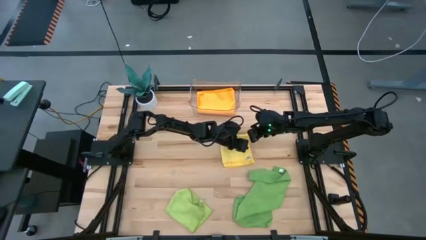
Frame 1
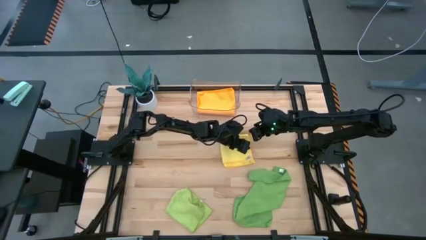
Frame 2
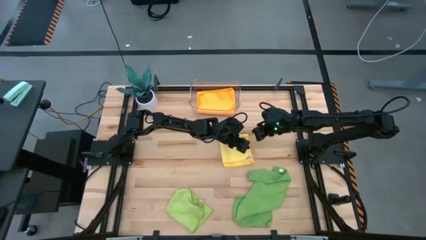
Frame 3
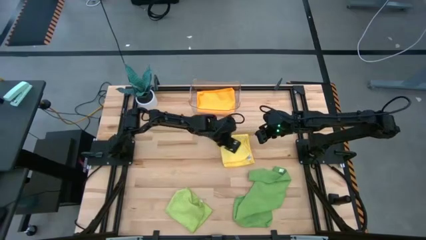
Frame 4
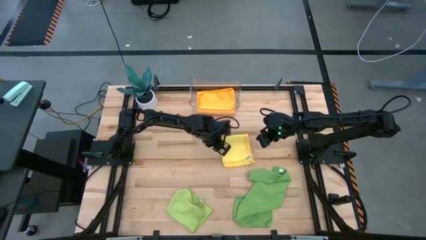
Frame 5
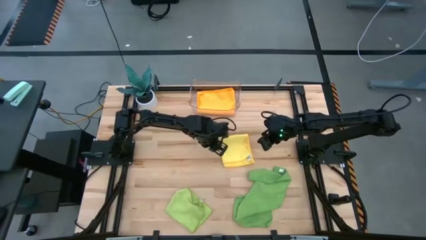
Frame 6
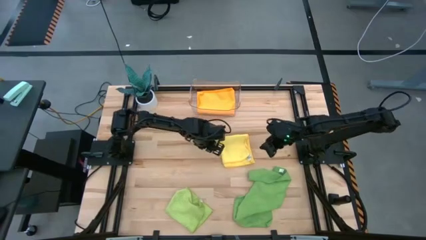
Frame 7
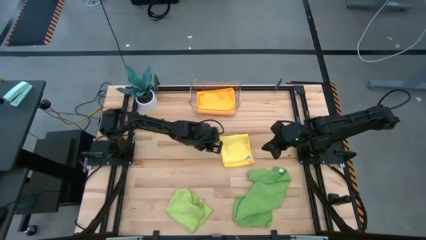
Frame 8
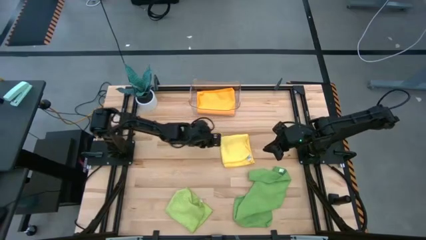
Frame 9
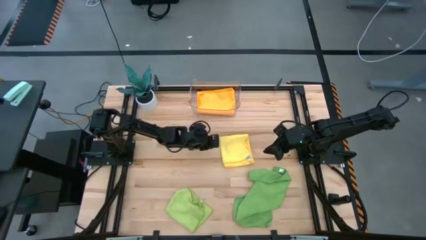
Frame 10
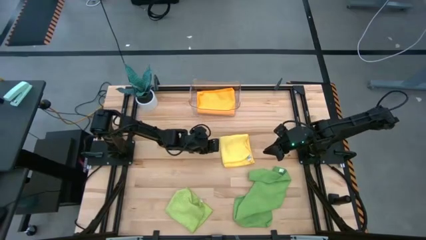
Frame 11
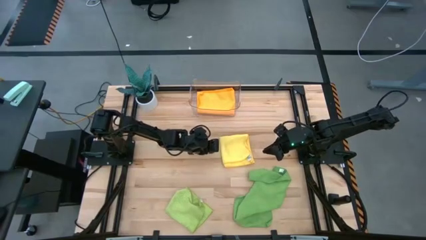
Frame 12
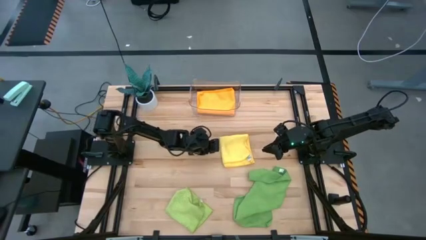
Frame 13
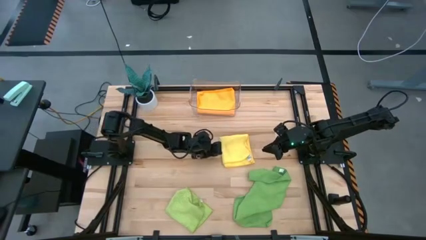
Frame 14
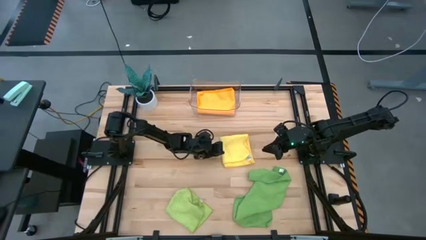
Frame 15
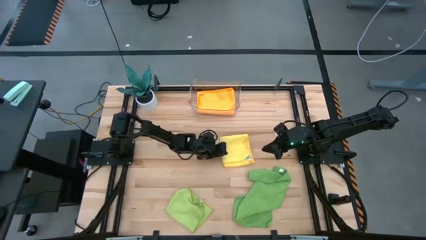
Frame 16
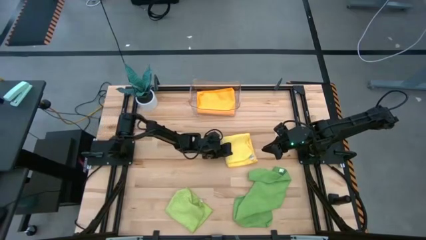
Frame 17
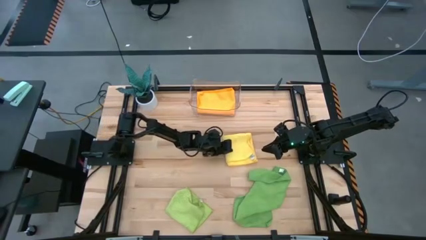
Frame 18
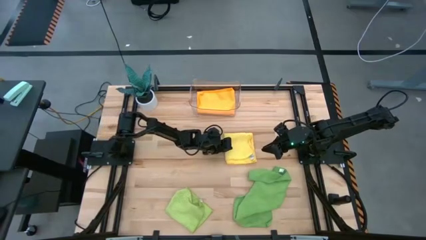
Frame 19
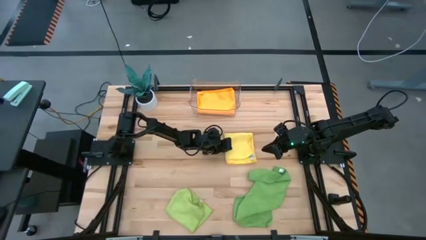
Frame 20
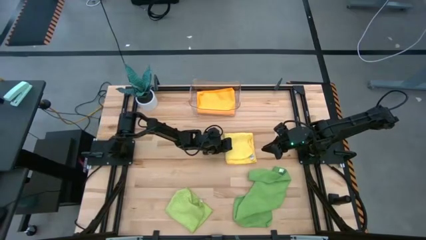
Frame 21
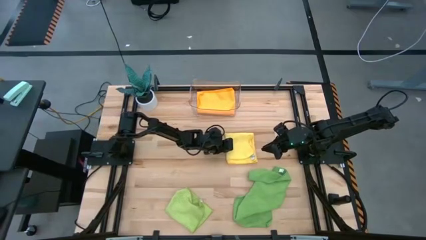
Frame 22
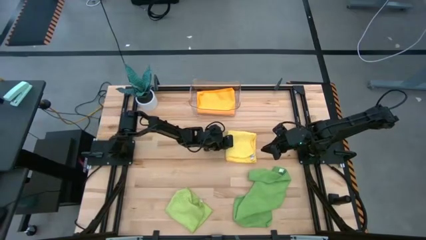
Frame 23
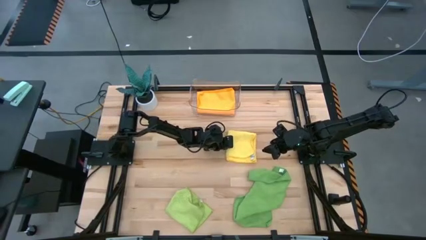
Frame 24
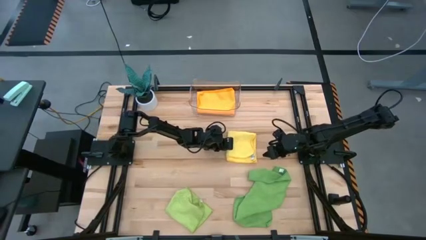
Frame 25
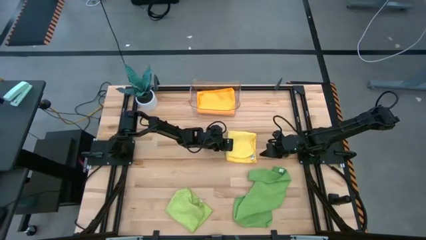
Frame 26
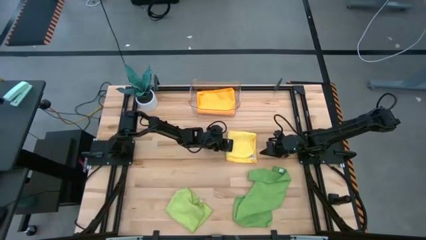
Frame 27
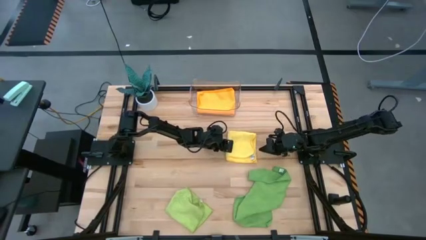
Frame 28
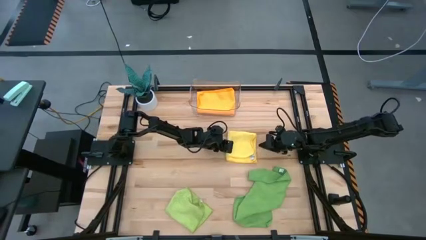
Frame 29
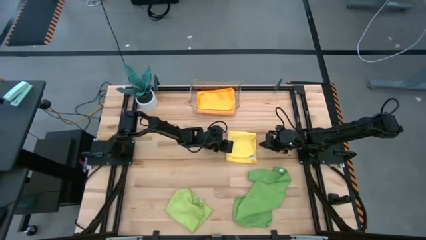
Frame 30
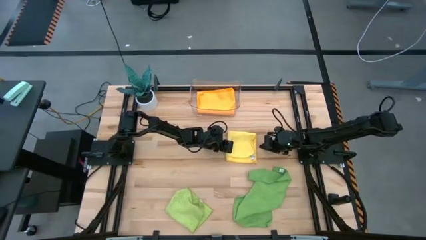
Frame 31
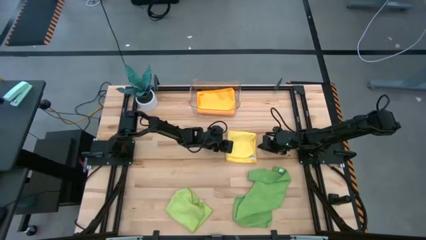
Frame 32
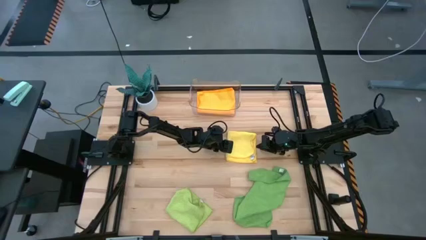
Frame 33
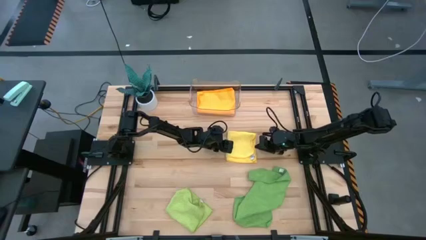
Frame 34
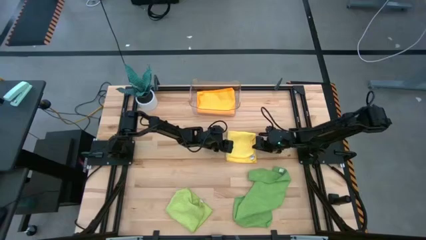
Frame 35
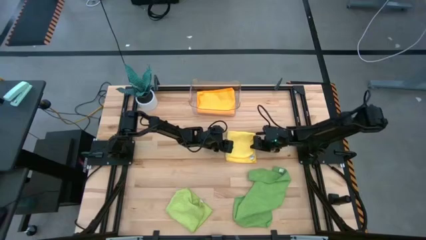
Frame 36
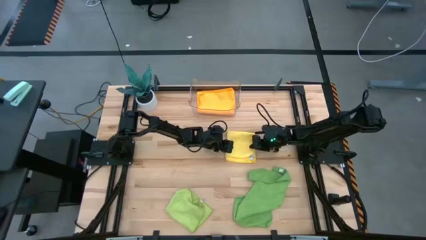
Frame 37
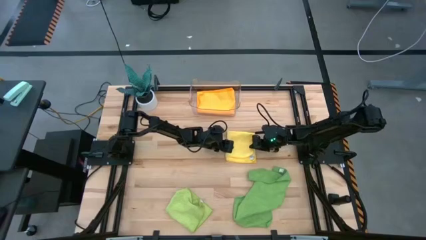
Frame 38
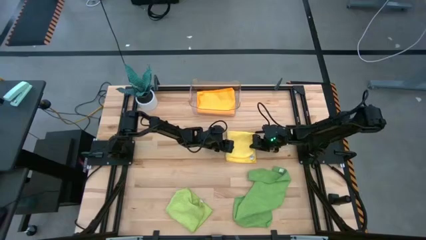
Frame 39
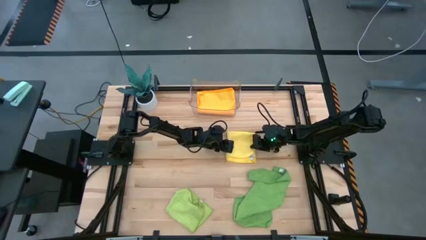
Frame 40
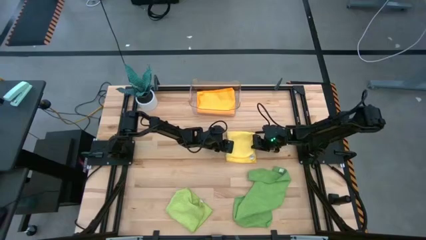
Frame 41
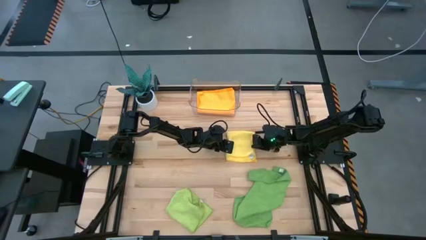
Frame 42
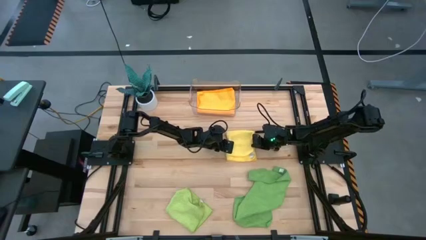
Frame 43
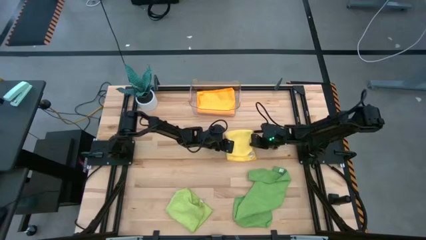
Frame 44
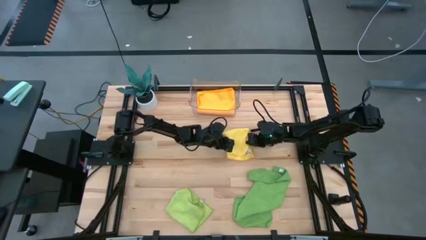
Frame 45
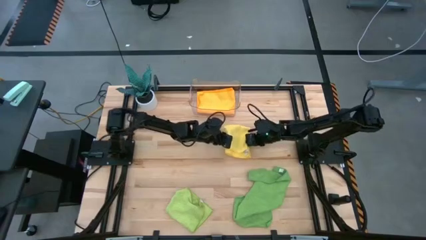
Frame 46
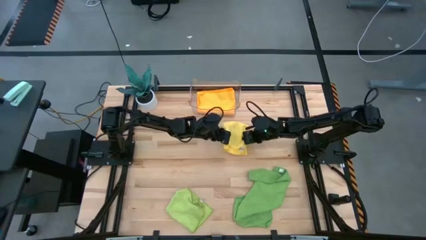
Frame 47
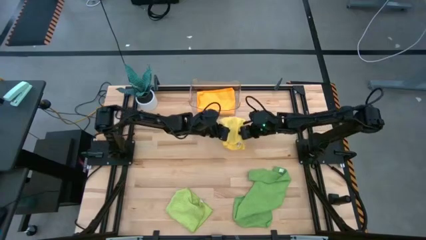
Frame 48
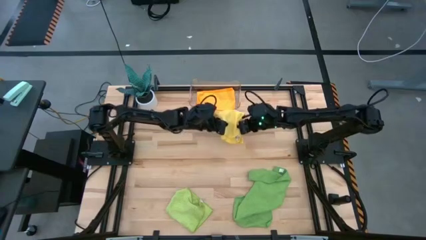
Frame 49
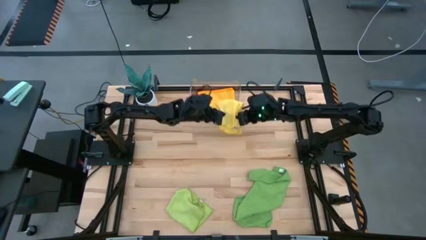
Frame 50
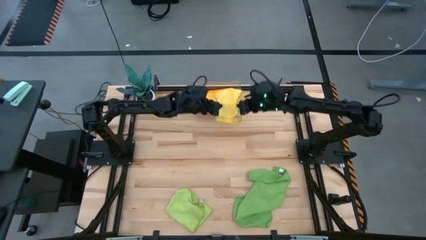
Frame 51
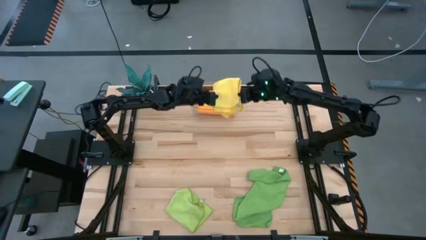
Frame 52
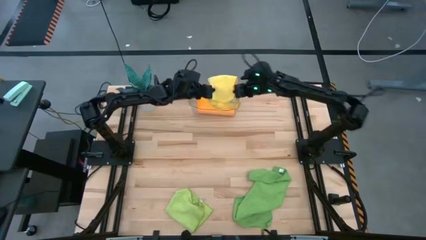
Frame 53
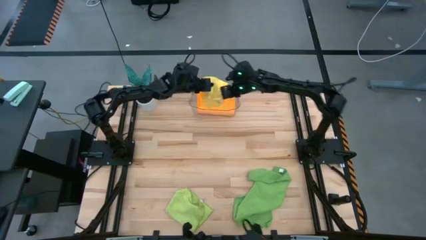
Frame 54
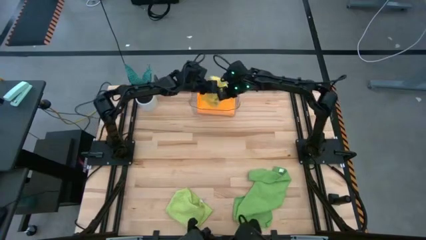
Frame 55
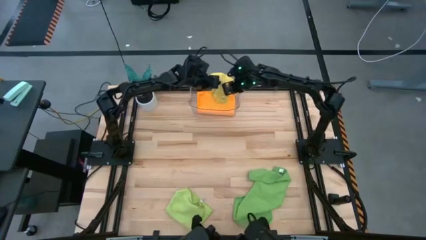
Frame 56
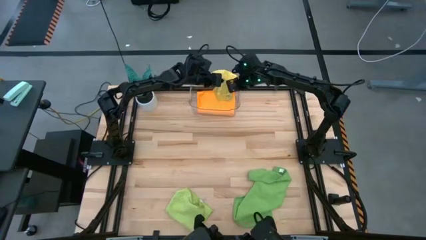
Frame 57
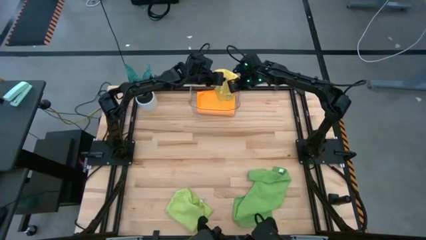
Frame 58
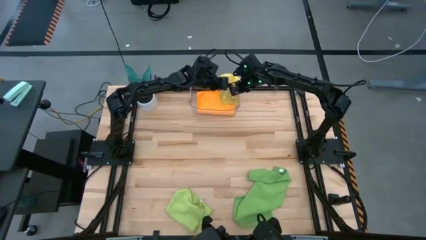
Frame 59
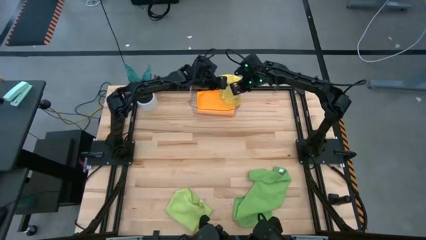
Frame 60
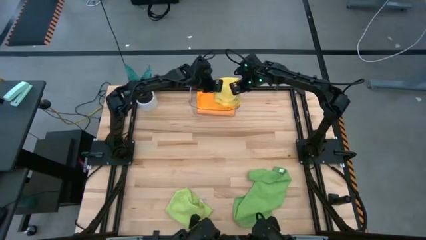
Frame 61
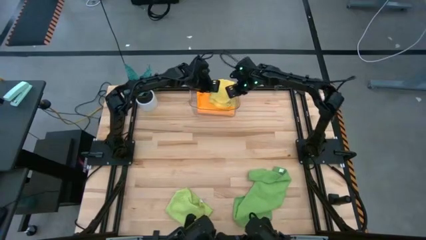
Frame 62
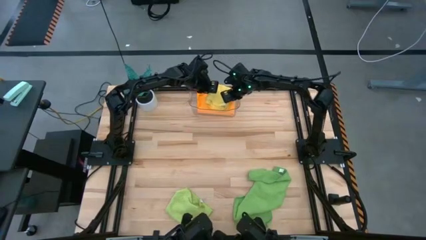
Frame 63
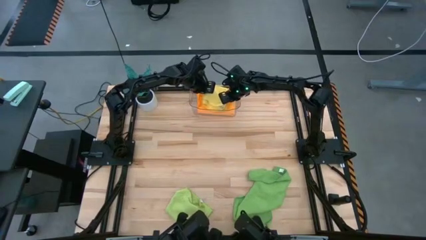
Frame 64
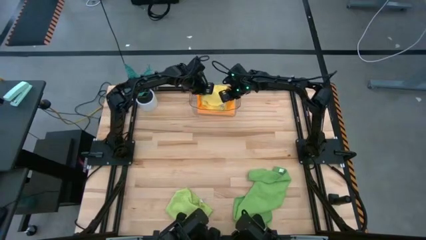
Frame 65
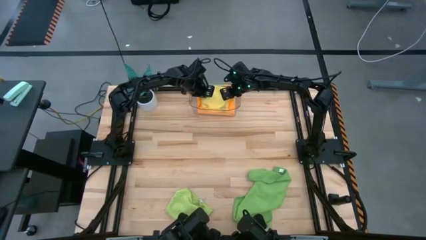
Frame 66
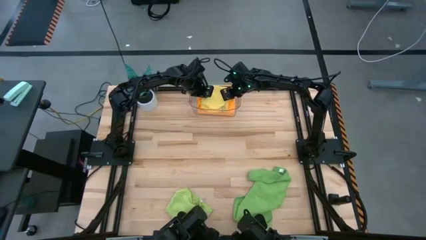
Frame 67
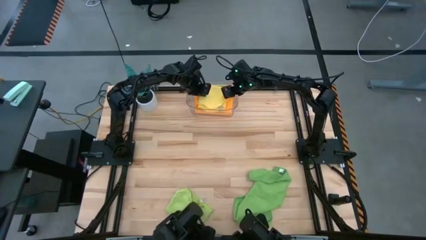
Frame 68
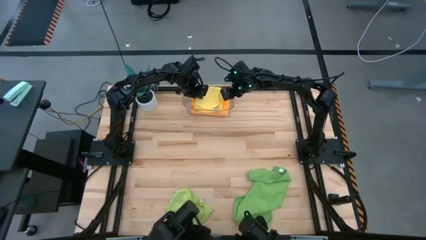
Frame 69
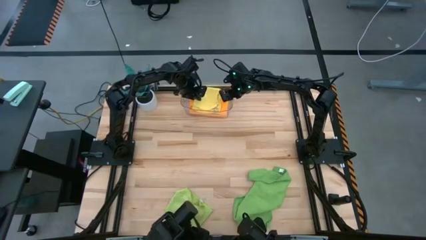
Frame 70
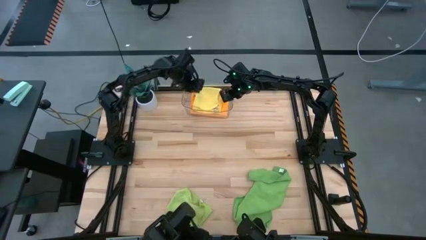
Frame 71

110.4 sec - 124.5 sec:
Task: Fold microfiber towels
Put the yellow towel into the transparent bin
